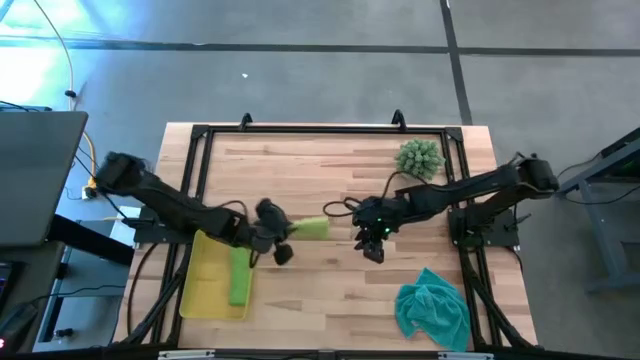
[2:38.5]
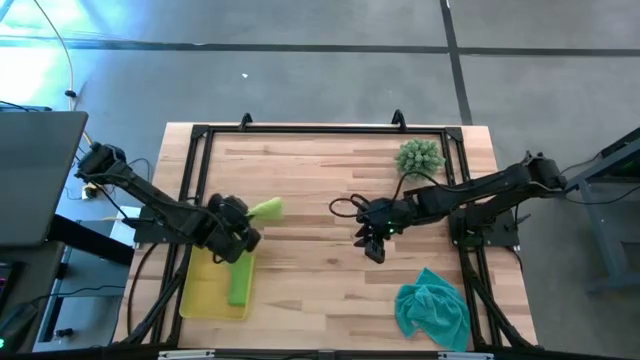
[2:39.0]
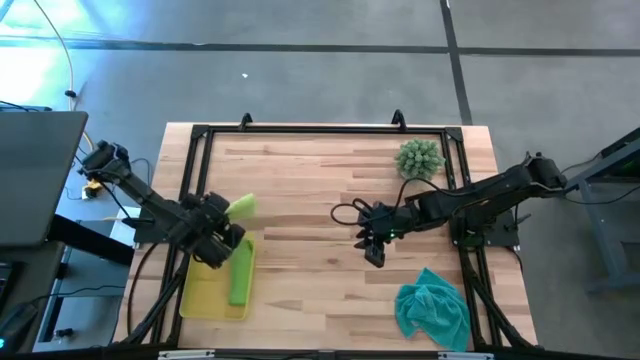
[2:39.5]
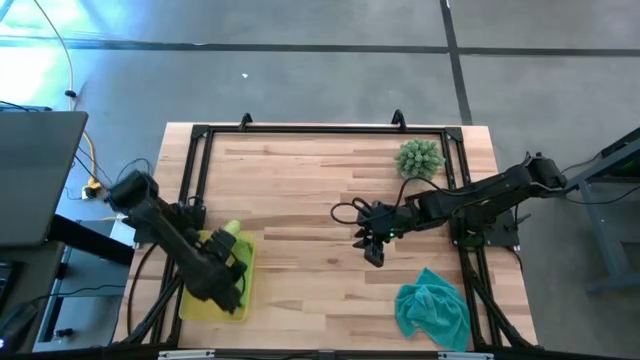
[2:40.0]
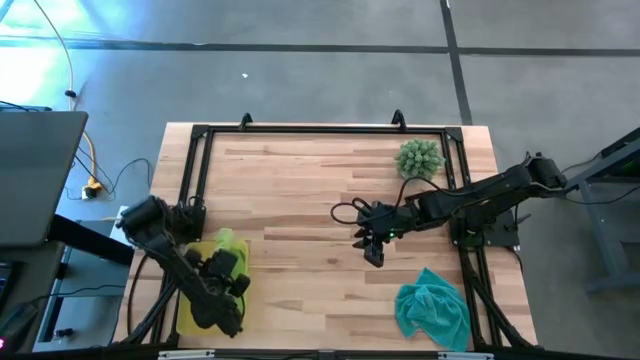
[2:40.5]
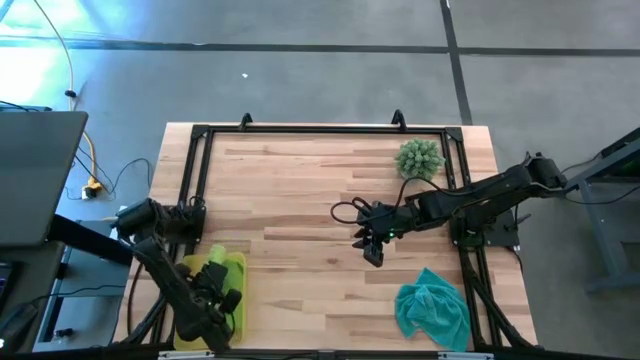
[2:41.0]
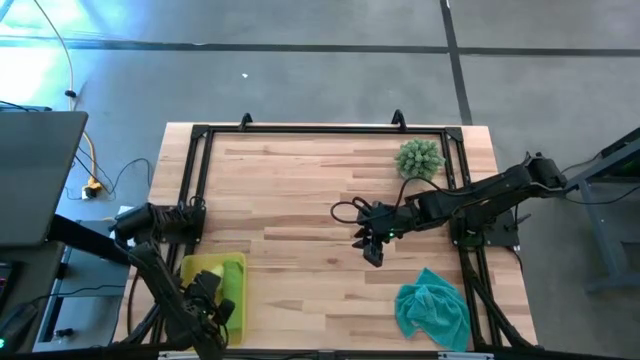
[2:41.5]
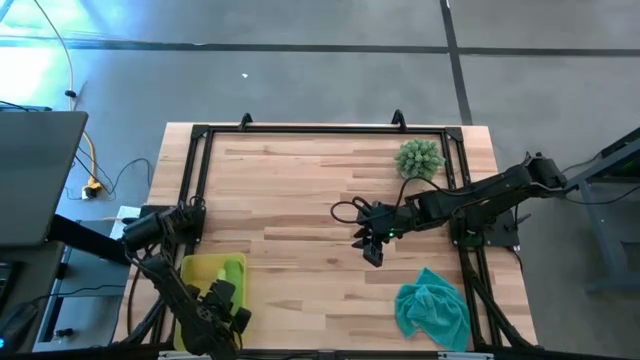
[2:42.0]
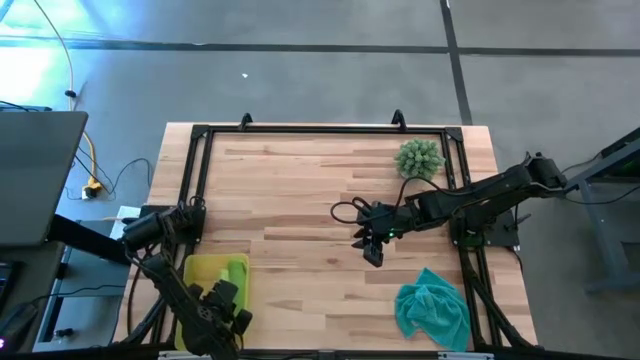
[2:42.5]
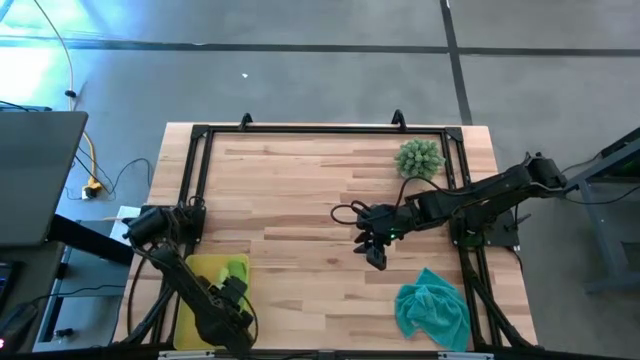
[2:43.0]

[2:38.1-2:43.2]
Task: Roll microfiber towels into tight, uniform cylinder then place into a basket
Put the light green microfiber towel into the yellow bin

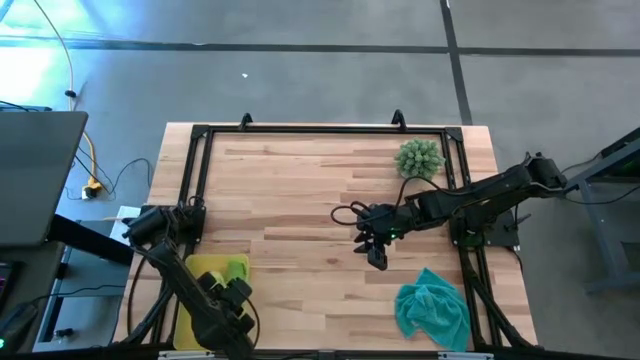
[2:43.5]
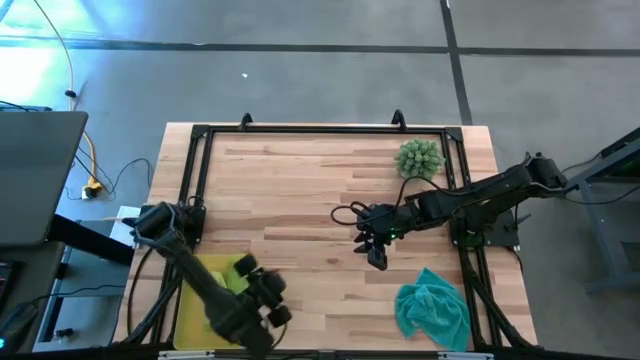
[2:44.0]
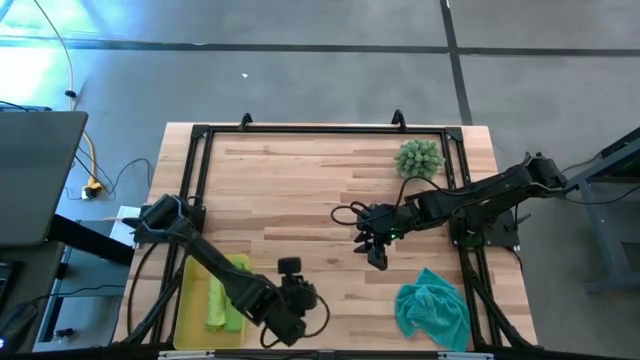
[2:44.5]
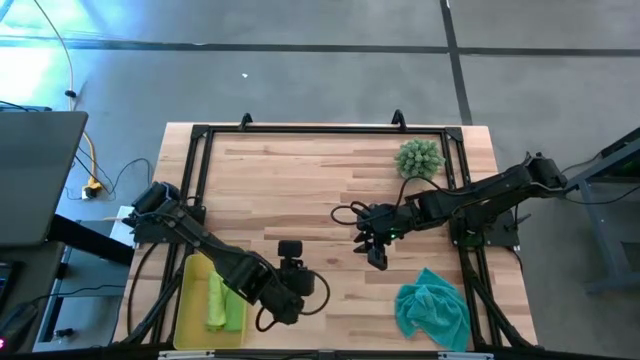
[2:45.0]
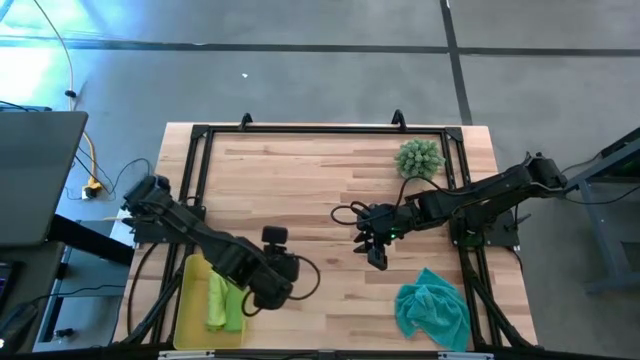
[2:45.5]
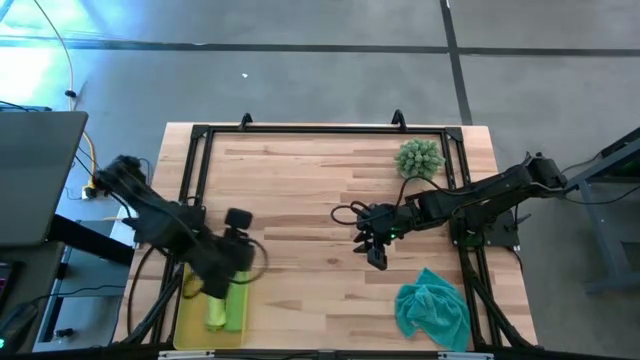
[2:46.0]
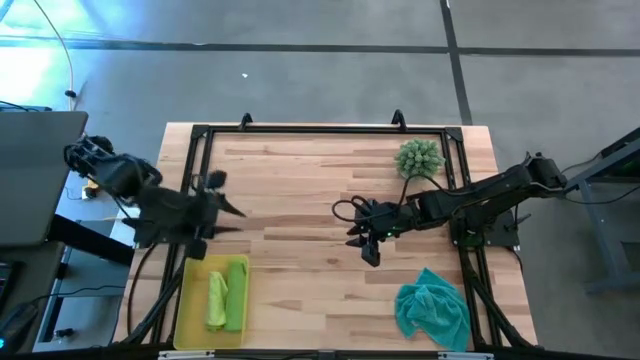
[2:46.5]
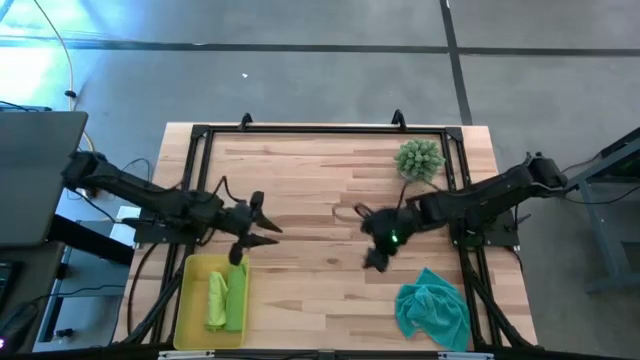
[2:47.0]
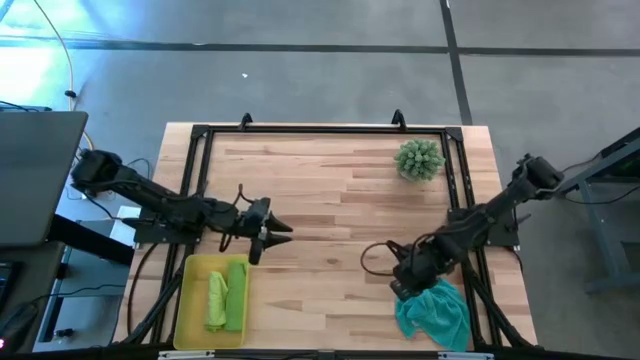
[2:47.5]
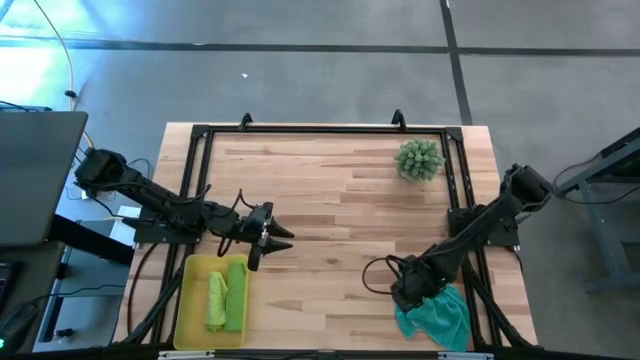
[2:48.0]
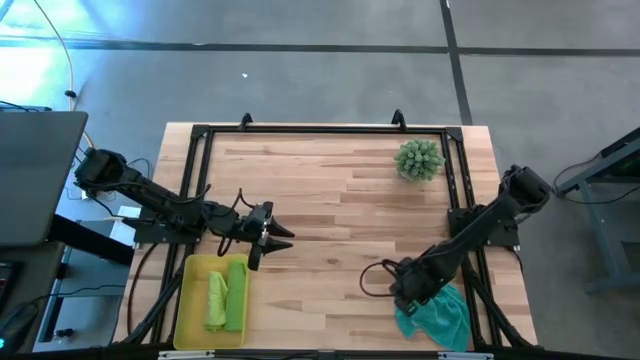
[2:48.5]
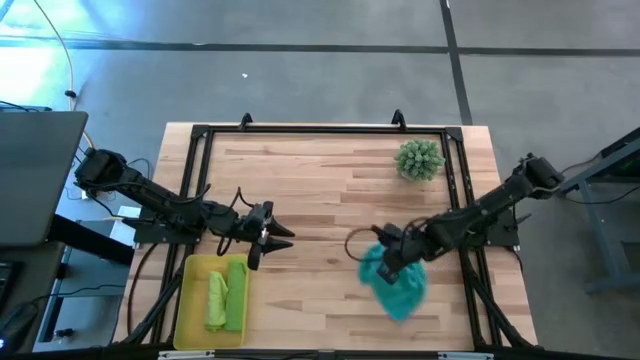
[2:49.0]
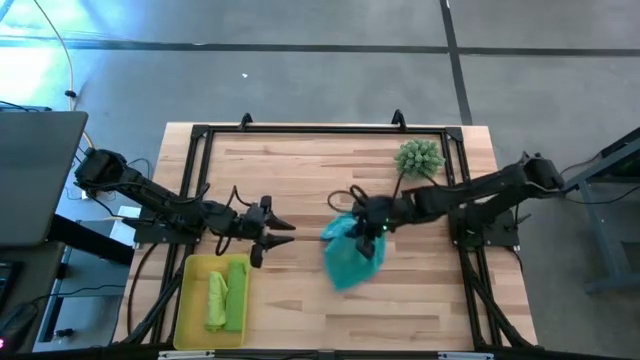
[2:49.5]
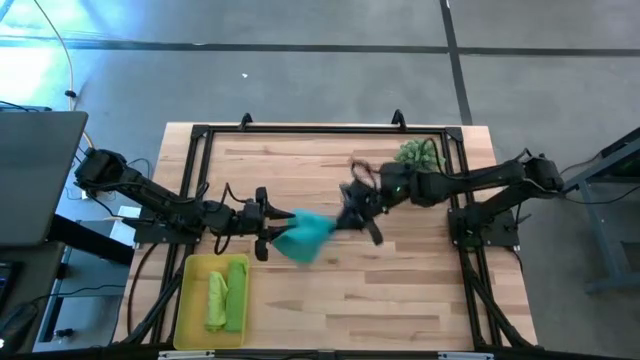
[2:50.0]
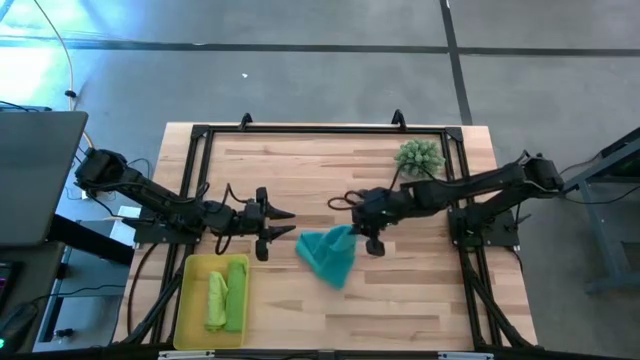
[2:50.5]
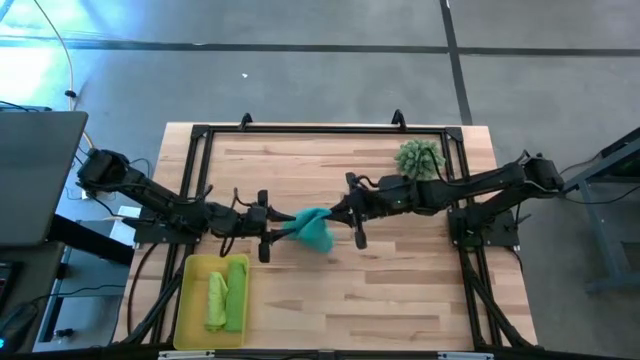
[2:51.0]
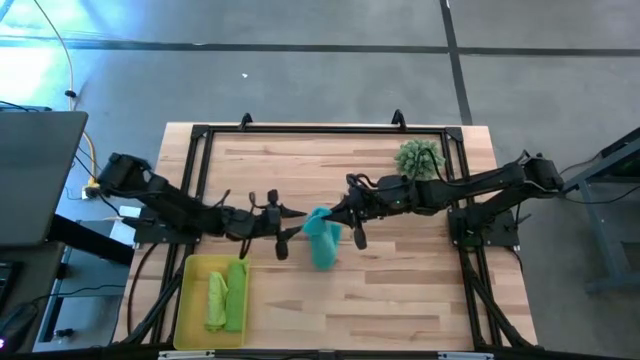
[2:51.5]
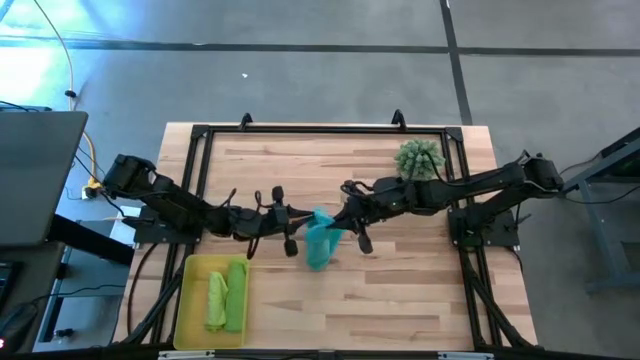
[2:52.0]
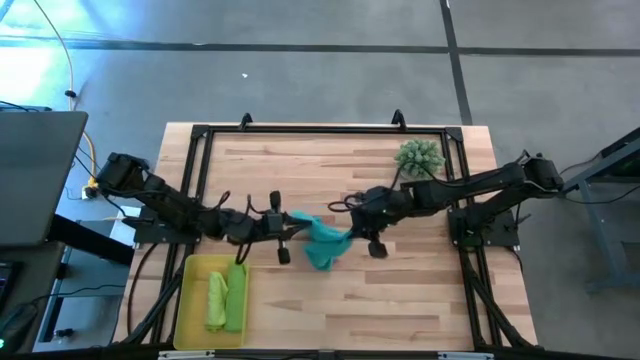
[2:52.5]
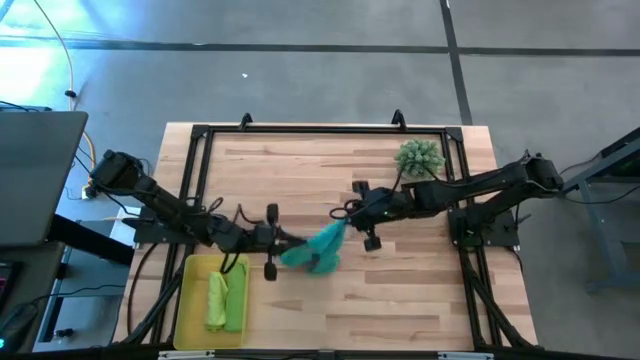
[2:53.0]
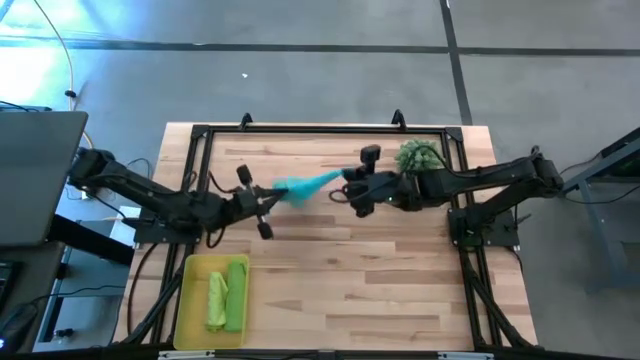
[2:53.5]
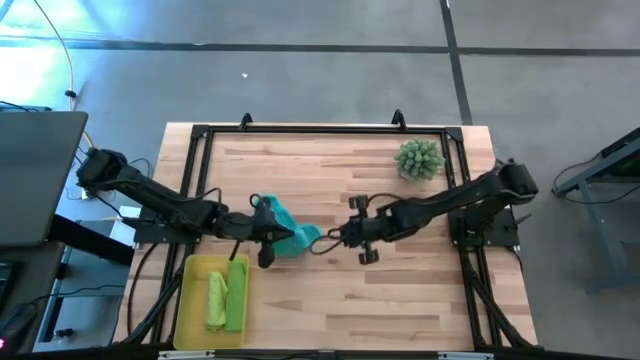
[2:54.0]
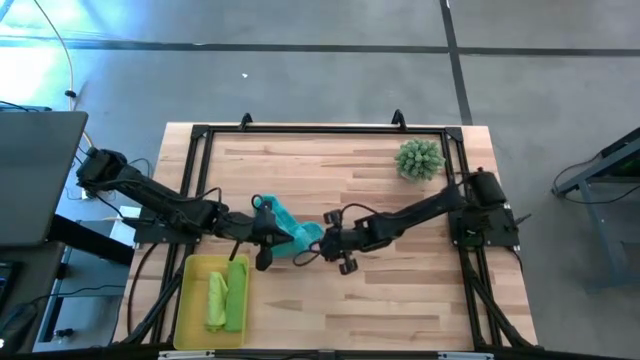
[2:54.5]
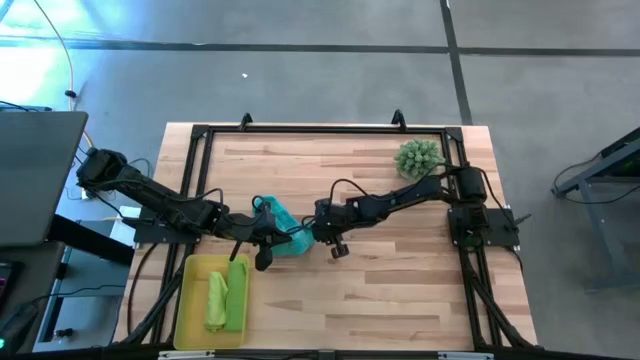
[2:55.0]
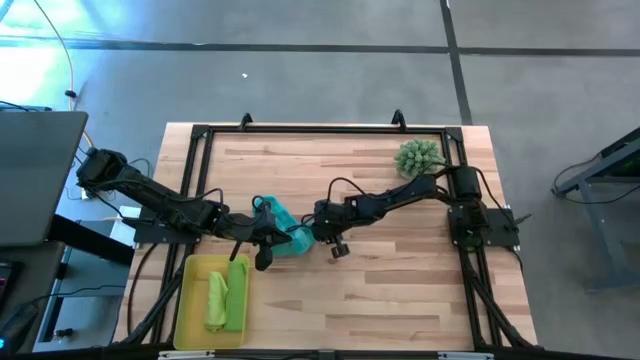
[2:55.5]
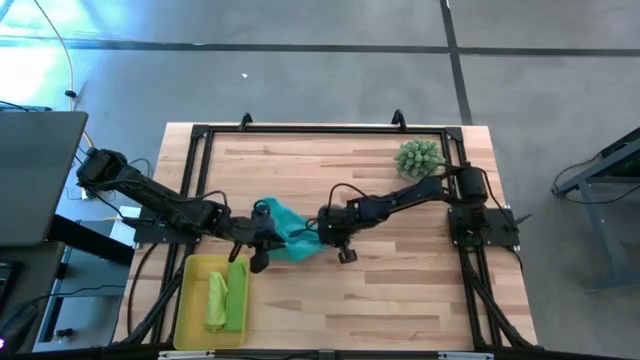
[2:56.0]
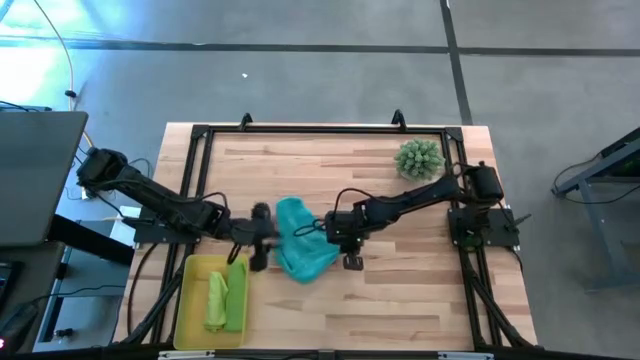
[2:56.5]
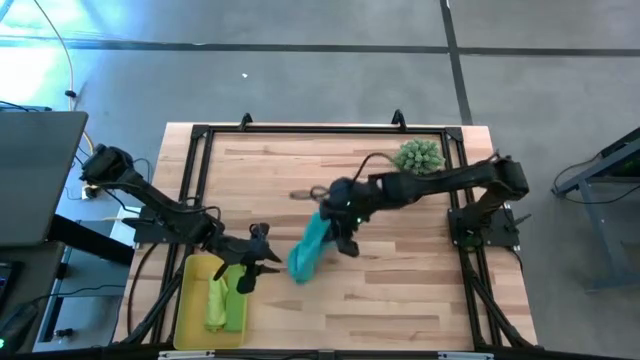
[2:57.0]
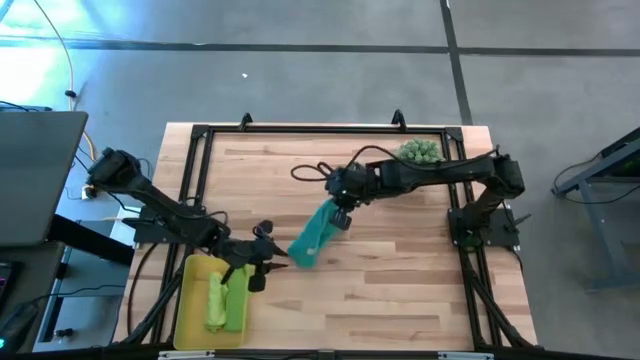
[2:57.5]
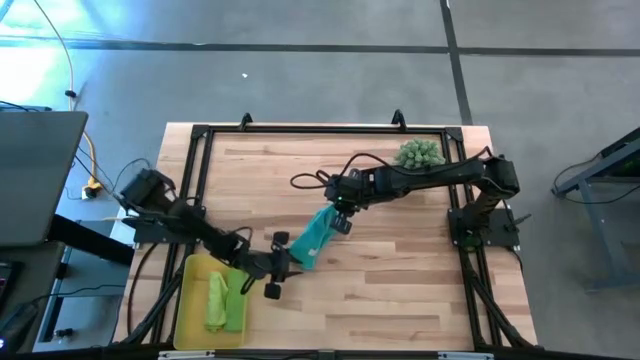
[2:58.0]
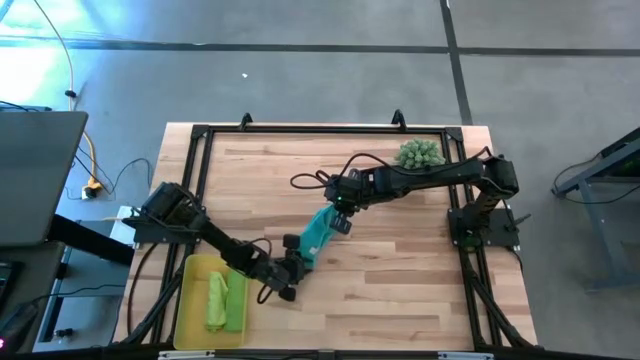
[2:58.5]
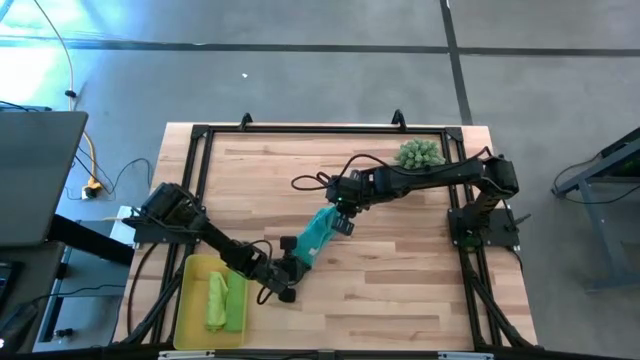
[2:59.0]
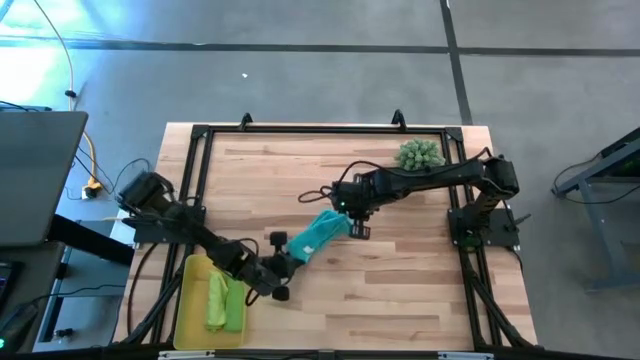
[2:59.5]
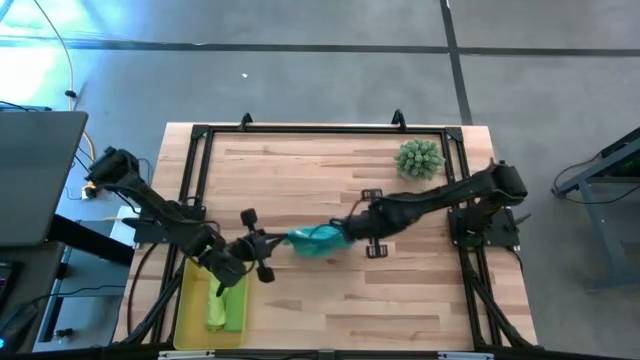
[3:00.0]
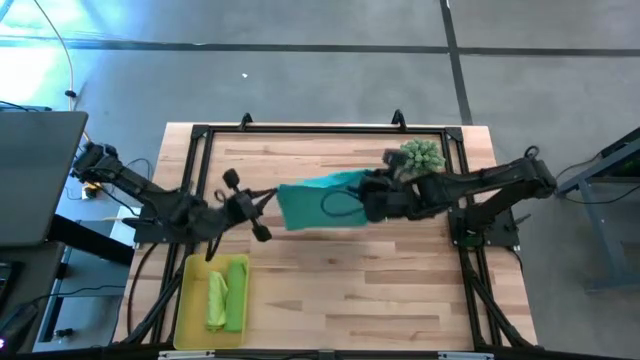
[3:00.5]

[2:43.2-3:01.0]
Fold the blue microfiber towel
